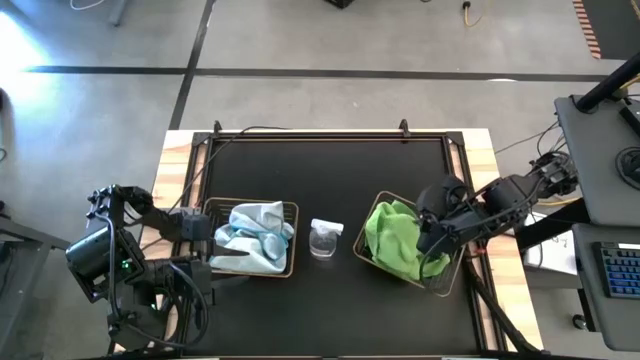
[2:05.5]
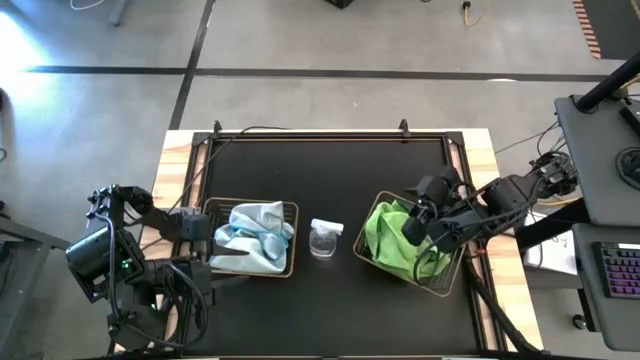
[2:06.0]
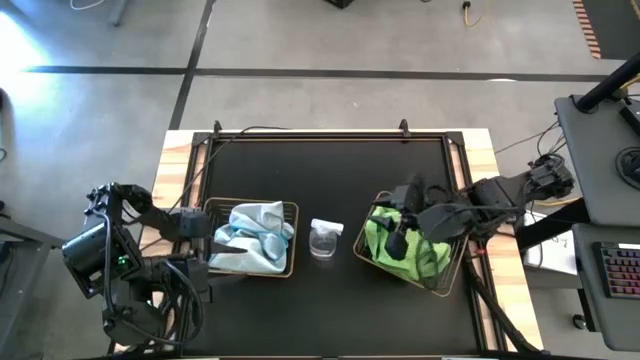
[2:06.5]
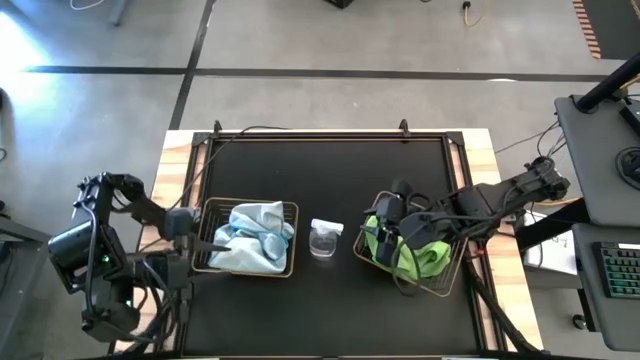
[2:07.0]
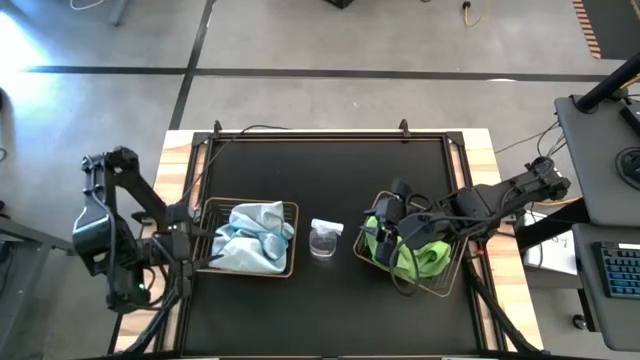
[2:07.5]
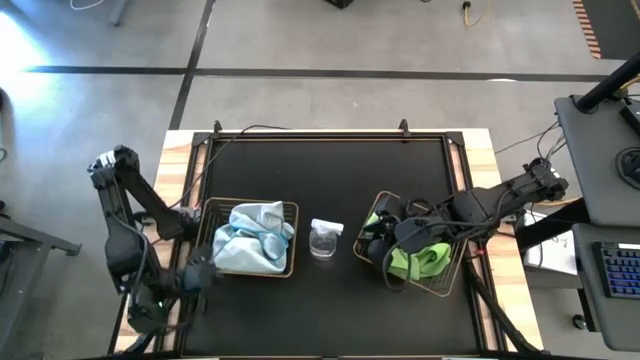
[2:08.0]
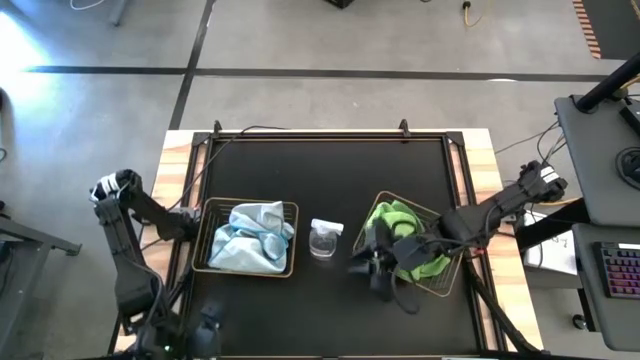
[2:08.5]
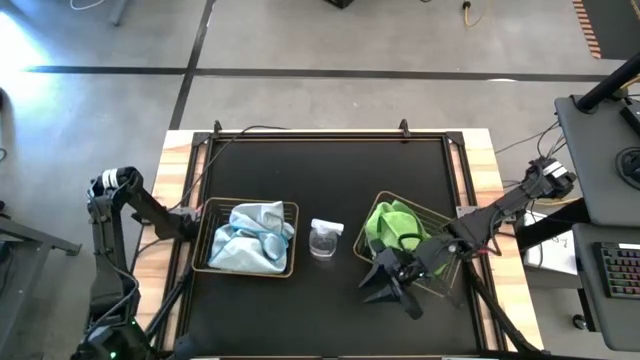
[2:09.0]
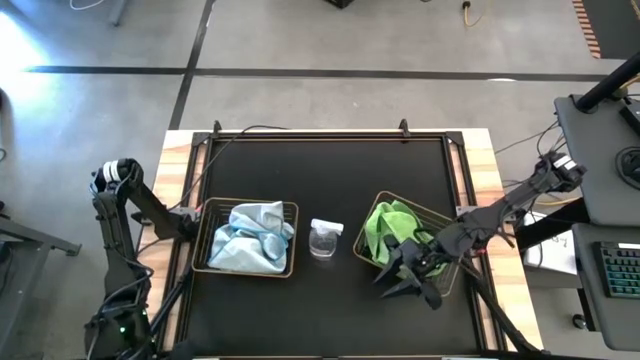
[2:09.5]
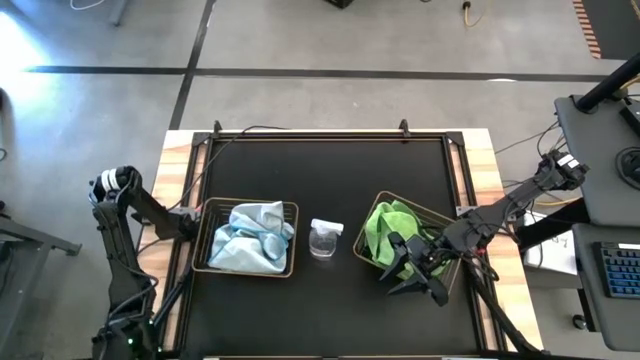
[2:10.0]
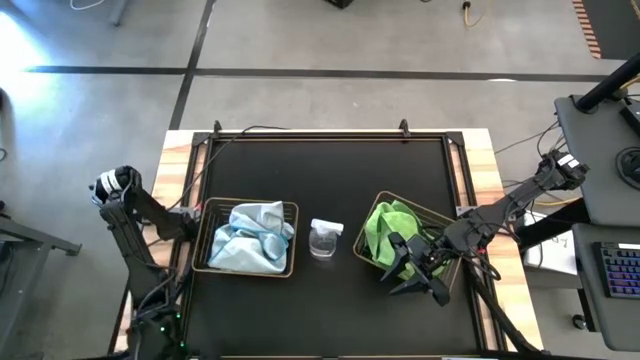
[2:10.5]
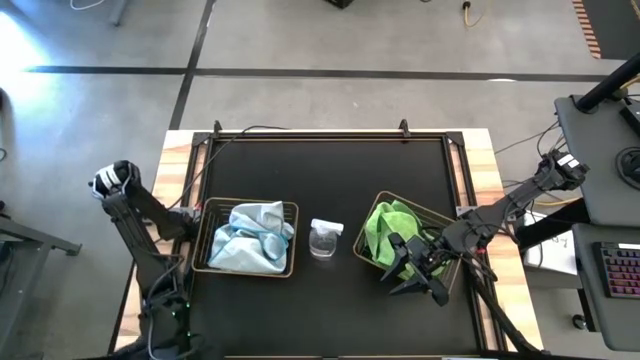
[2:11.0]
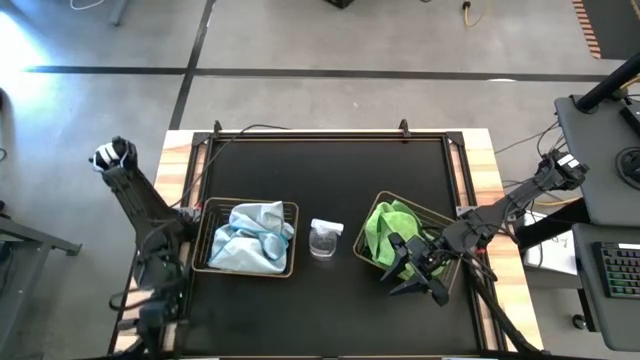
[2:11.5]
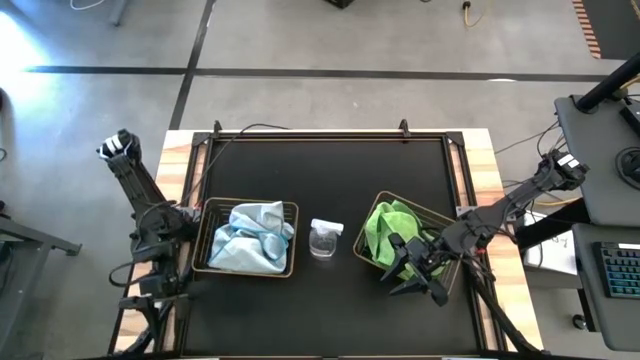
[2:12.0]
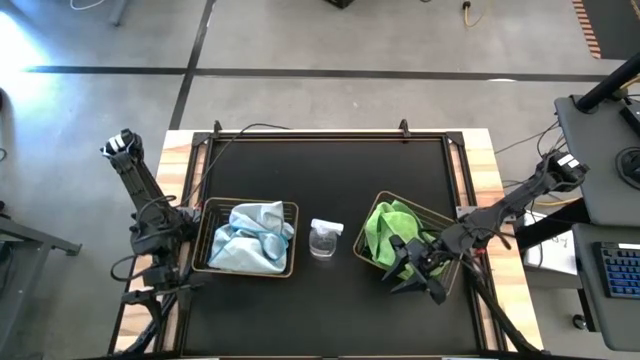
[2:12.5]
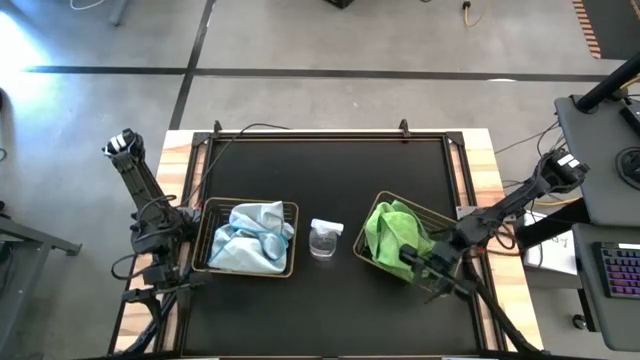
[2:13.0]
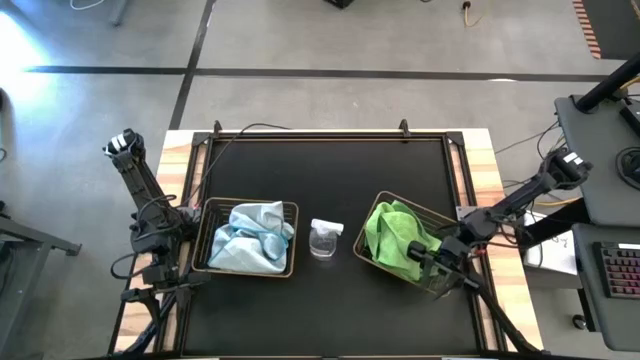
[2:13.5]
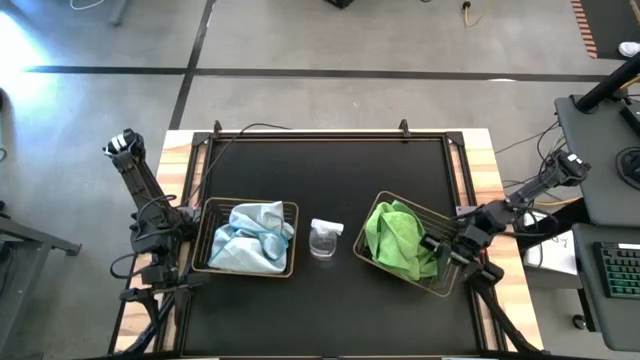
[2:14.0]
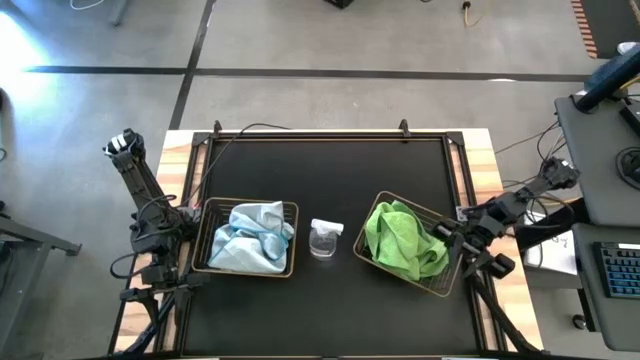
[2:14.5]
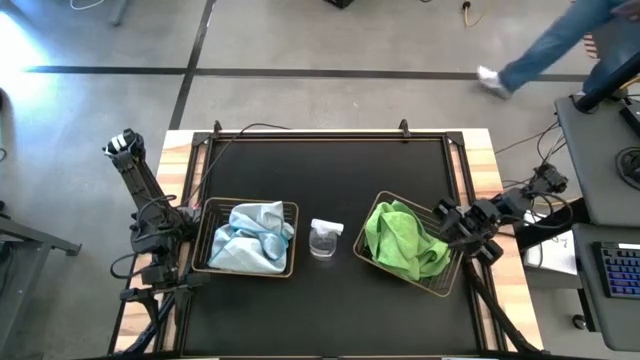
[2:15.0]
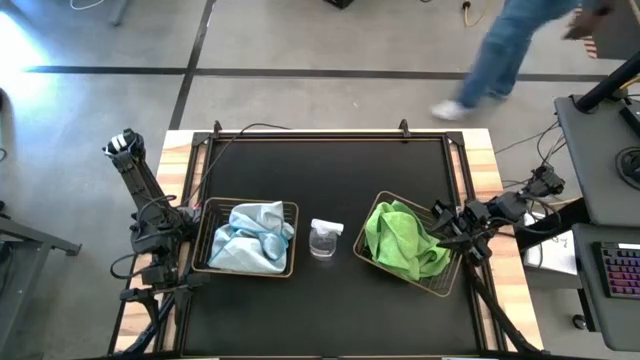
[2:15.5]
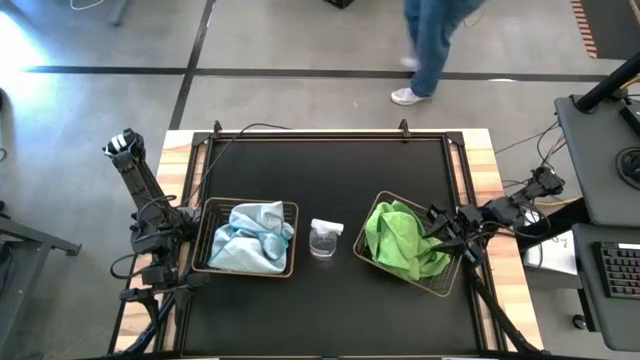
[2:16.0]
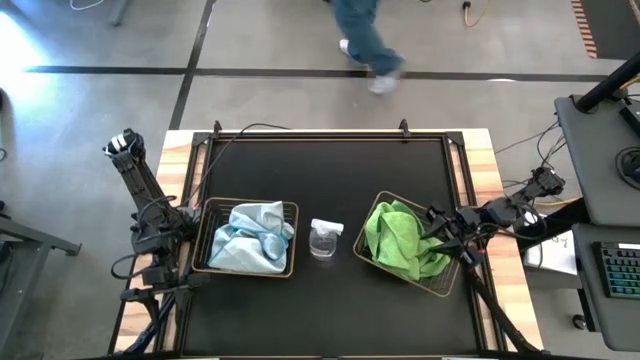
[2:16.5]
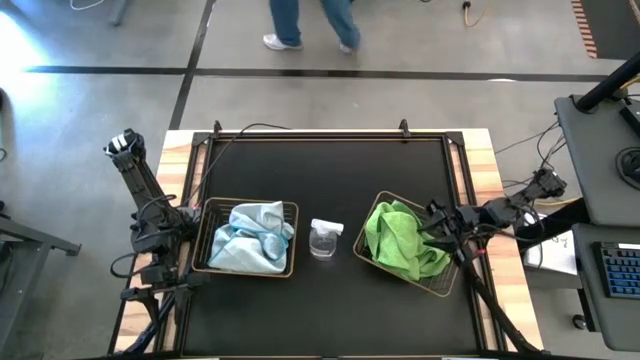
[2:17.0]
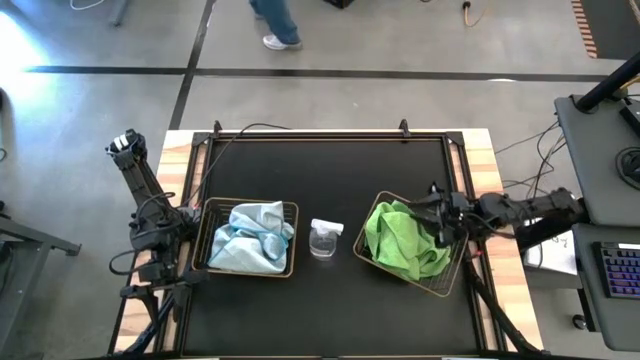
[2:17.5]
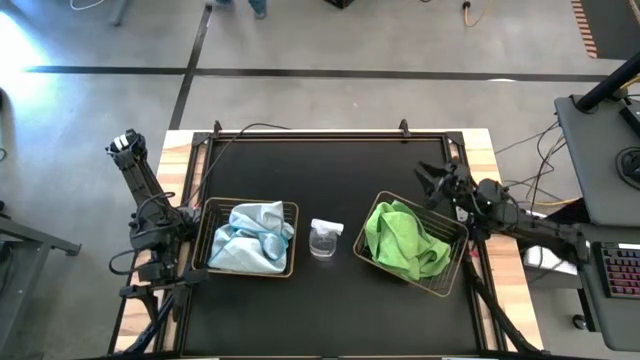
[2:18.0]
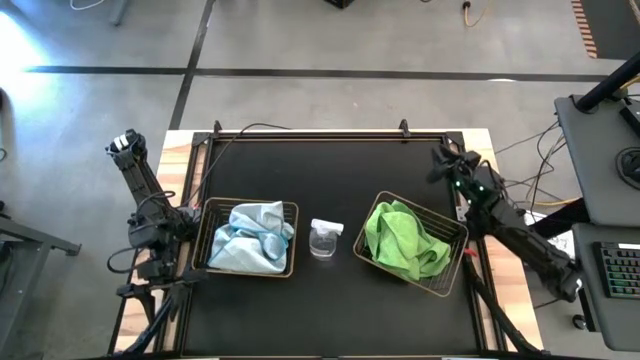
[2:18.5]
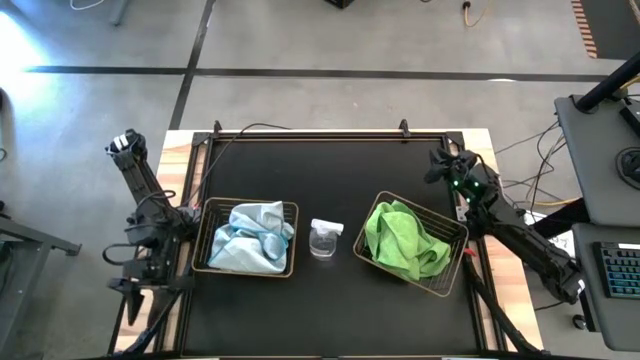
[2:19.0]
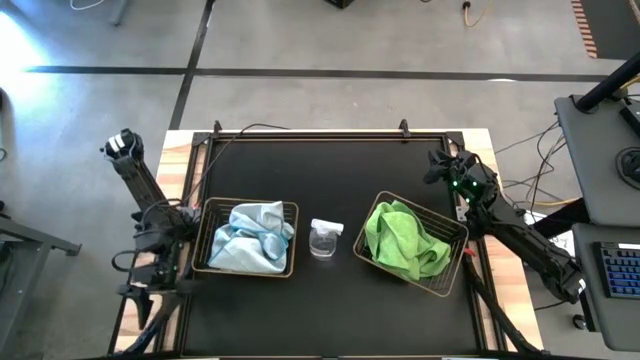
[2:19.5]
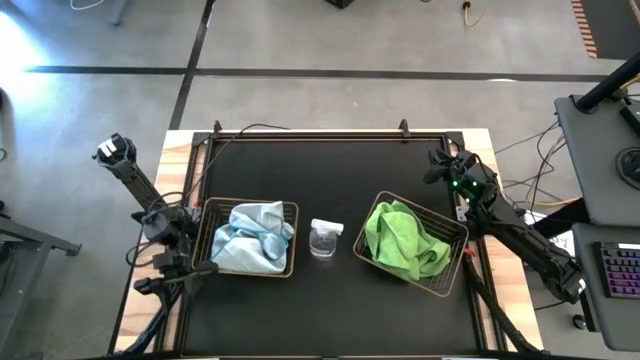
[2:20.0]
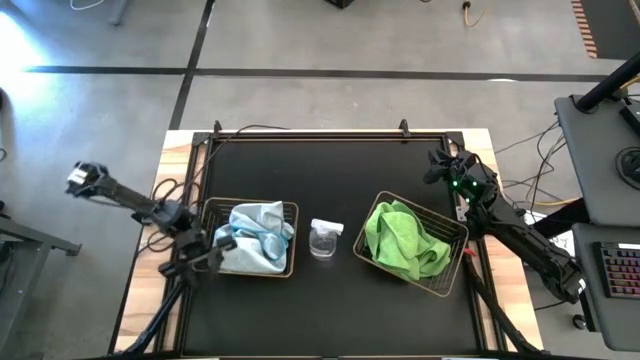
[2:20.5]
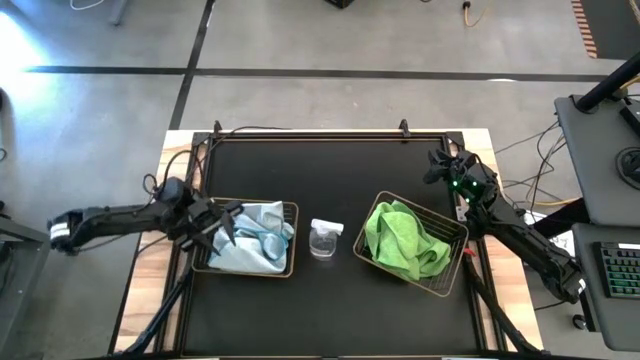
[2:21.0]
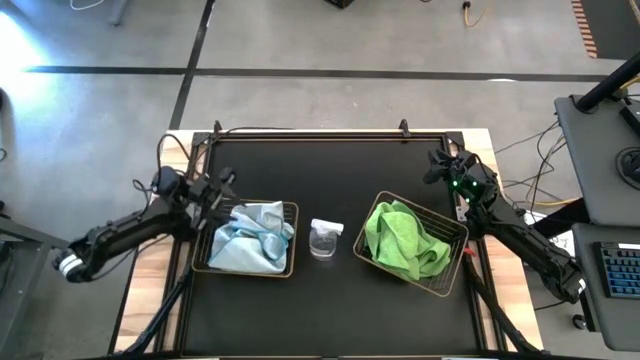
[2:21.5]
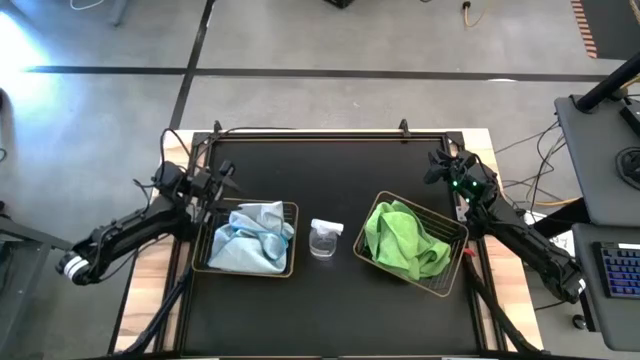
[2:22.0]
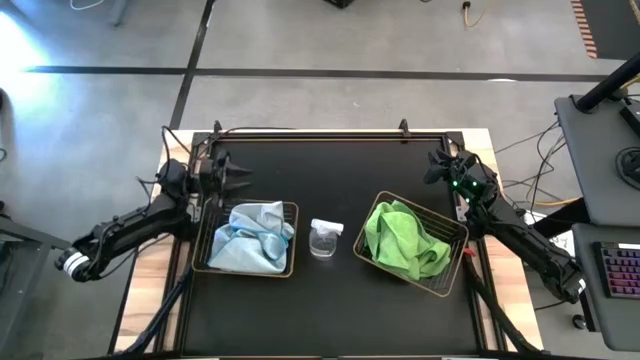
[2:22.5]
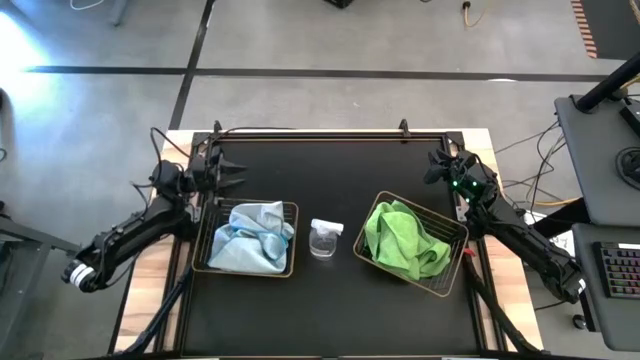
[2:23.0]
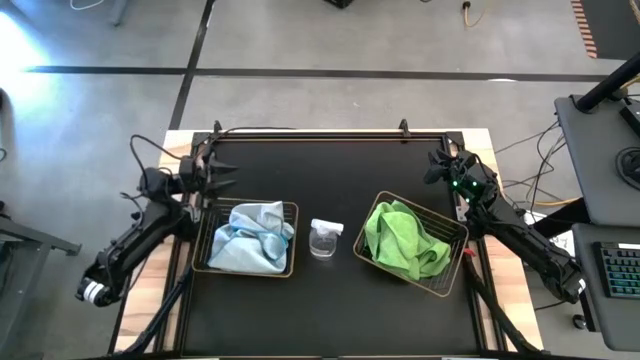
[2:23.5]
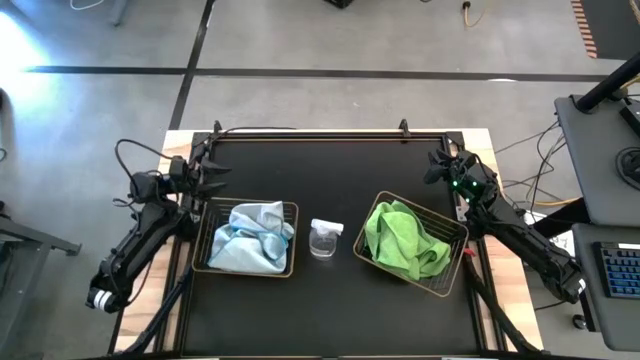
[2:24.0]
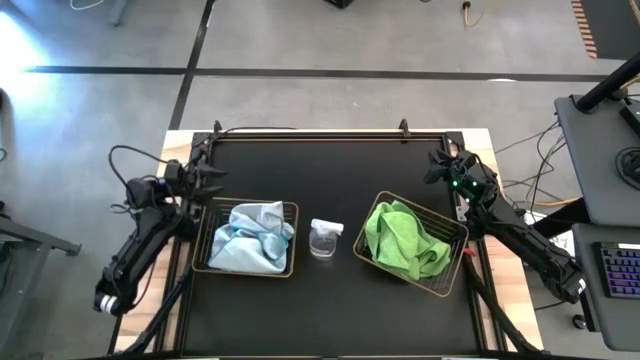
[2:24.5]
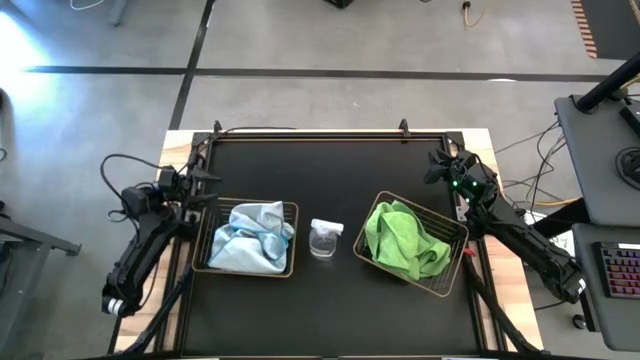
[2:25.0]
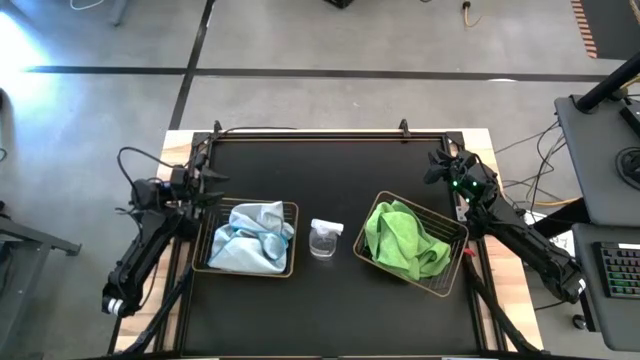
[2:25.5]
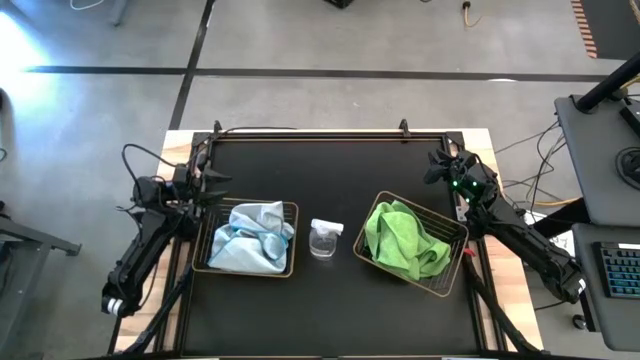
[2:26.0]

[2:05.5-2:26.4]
Task: Sort microfiber towel by color & place in baskets
Return to Home Position

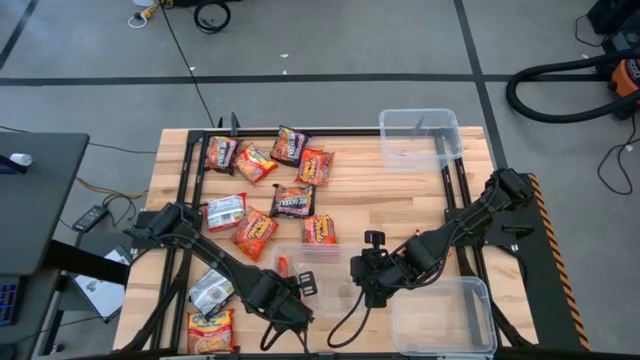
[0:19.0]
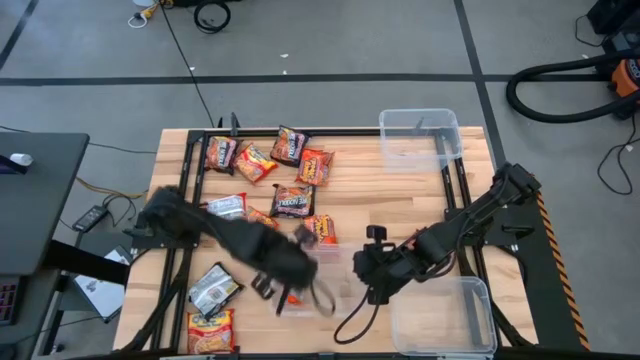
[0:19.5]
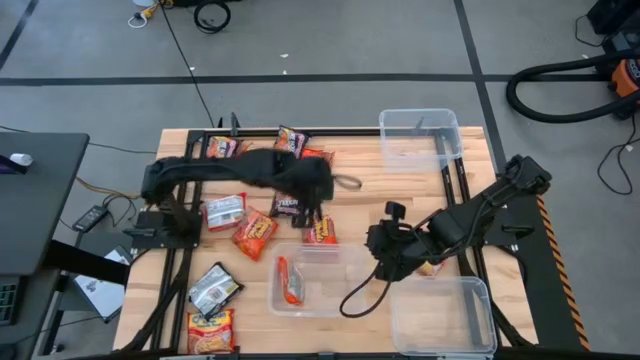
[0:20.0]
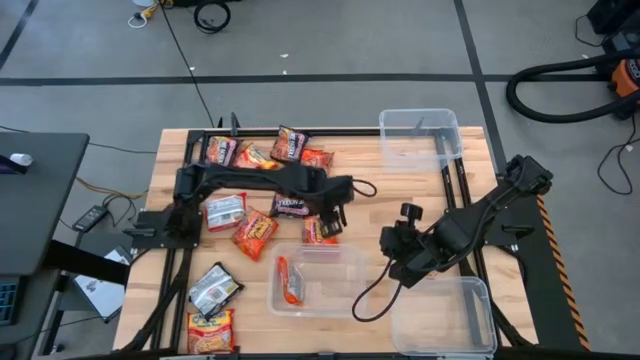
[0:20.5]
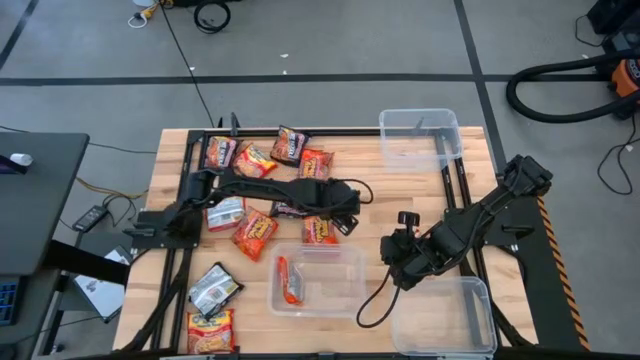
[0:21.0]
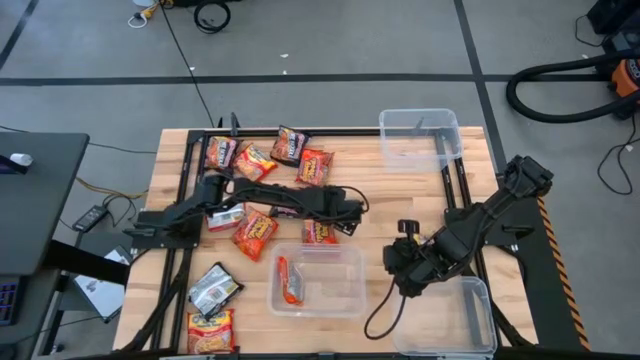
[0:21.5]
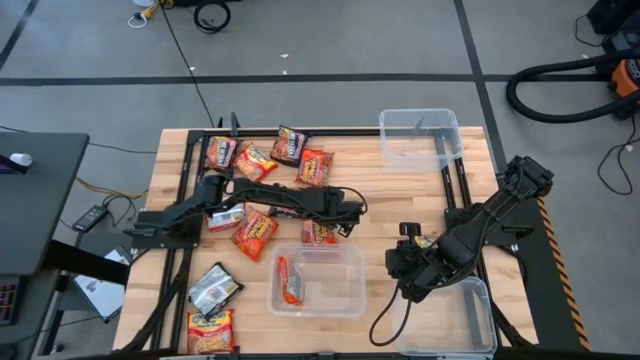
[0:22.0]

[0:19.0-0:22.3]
Task: Sort Maruchan noodles
Put the orange noodle pack into the bottom left transparent bin
